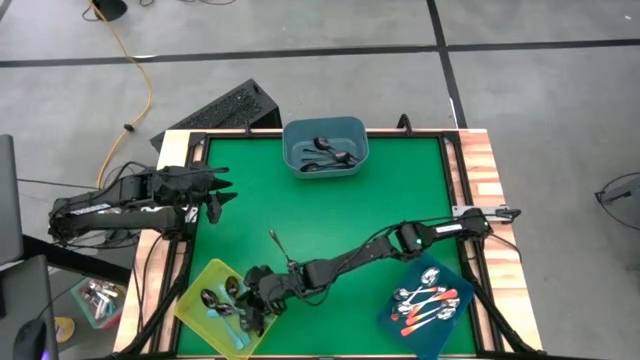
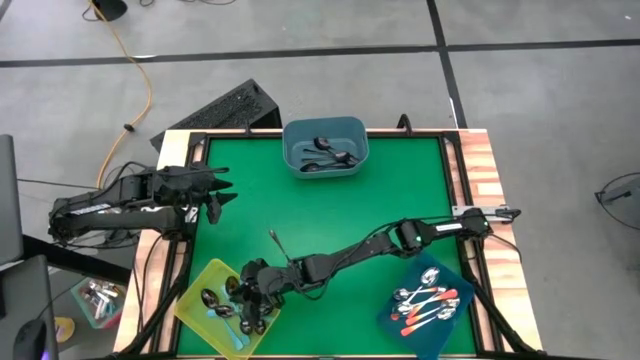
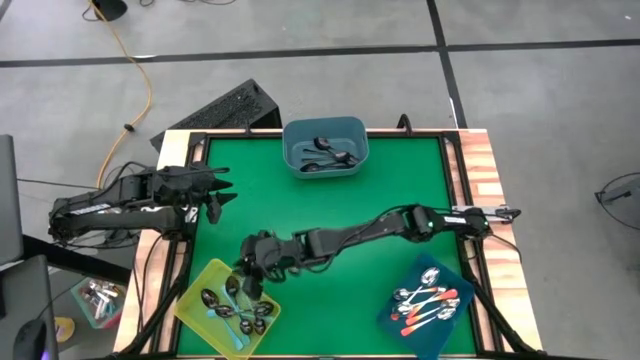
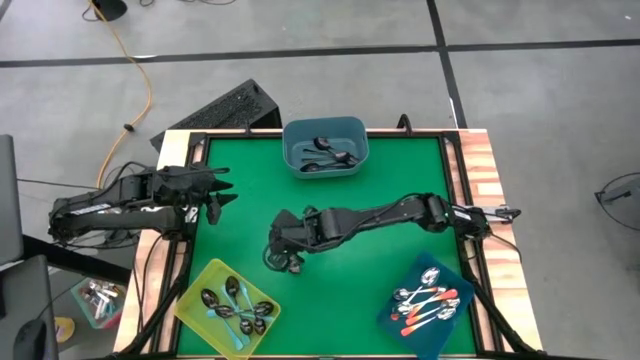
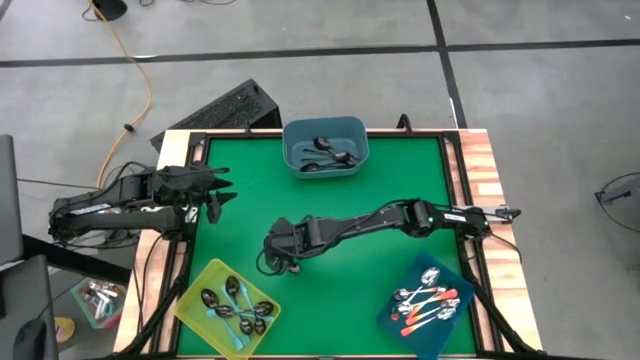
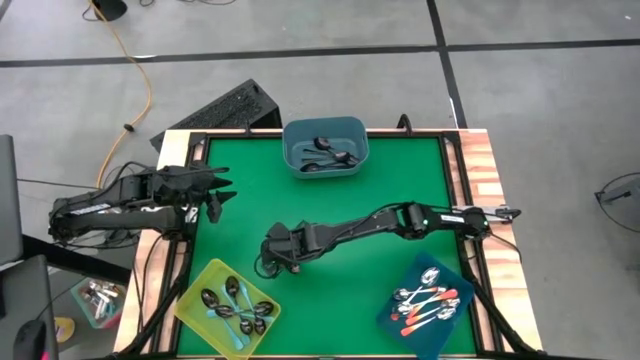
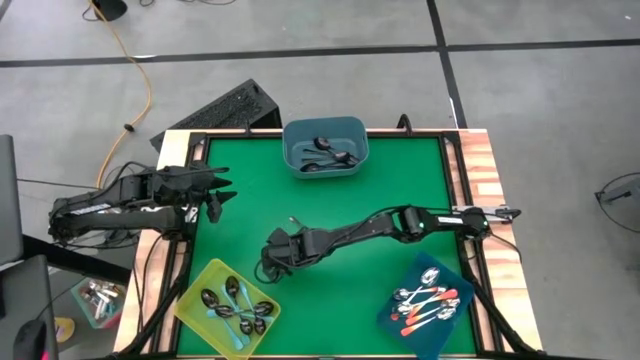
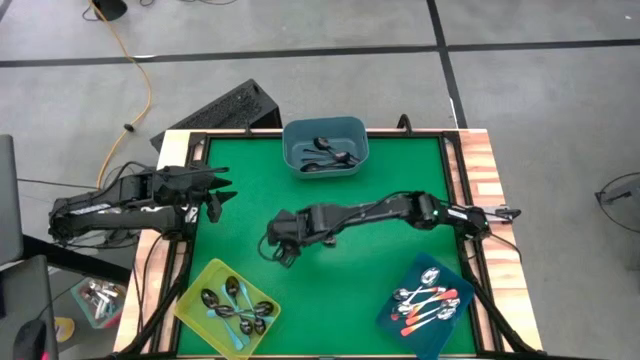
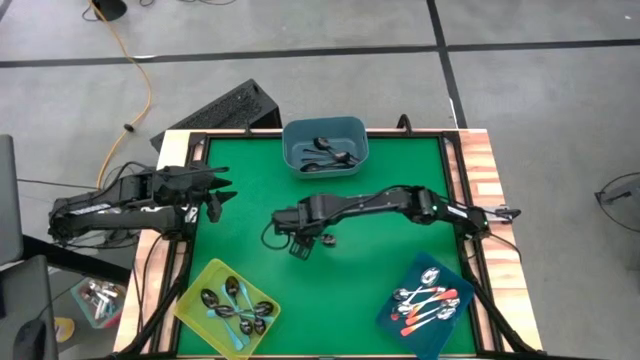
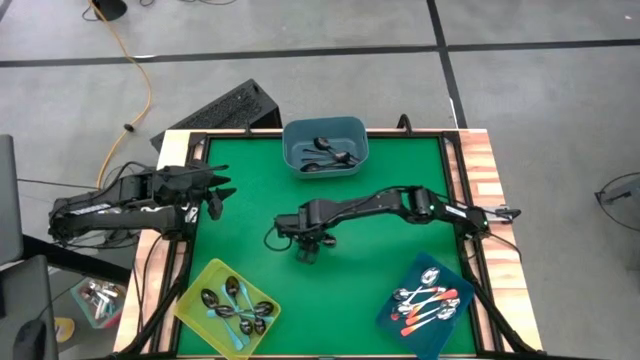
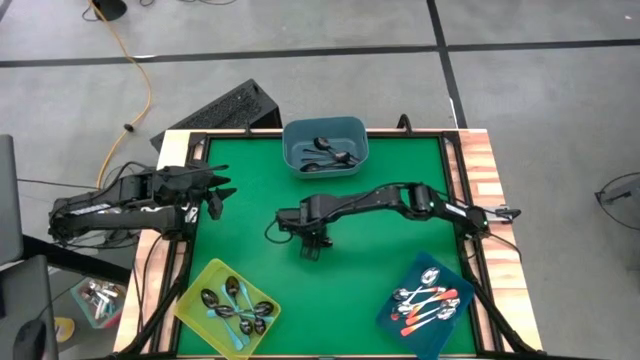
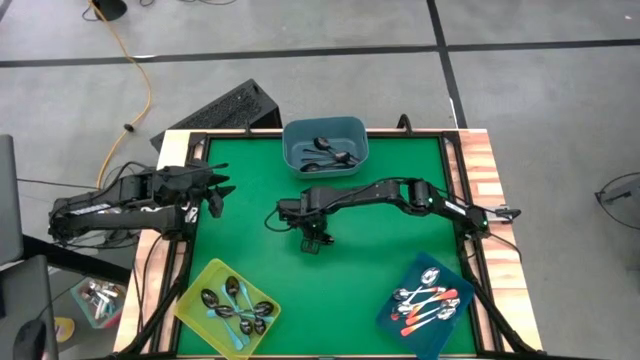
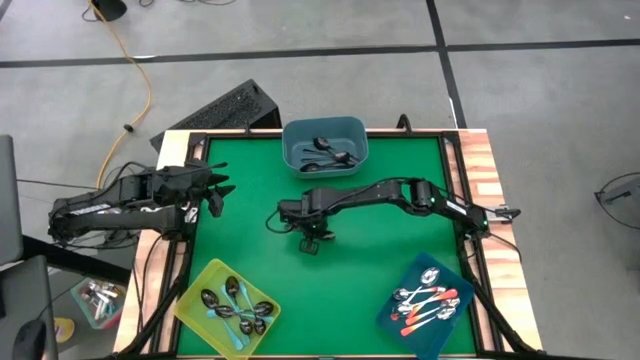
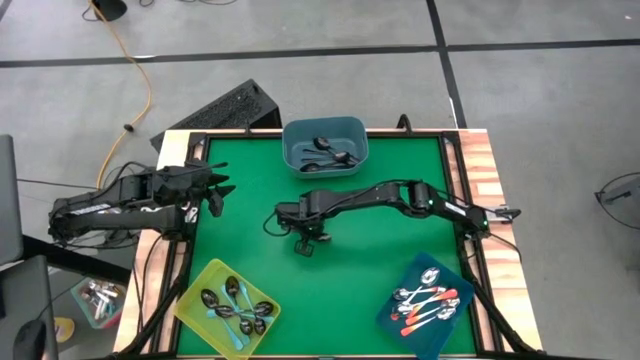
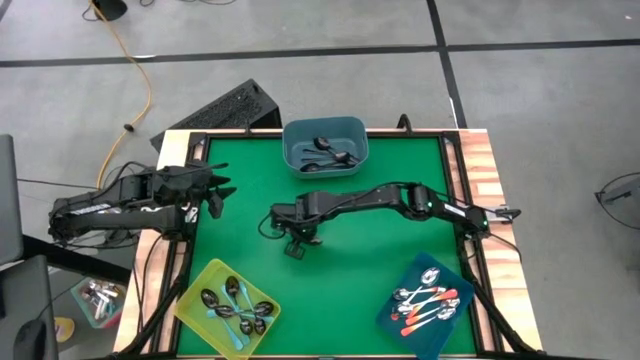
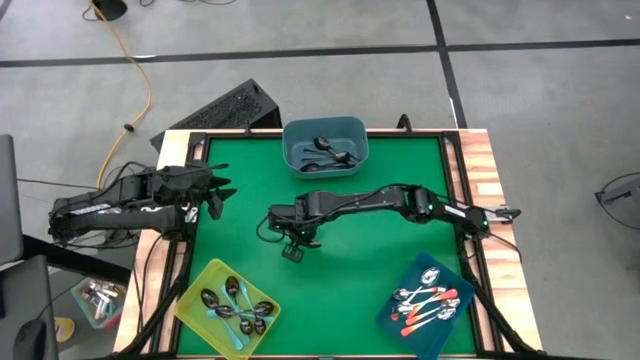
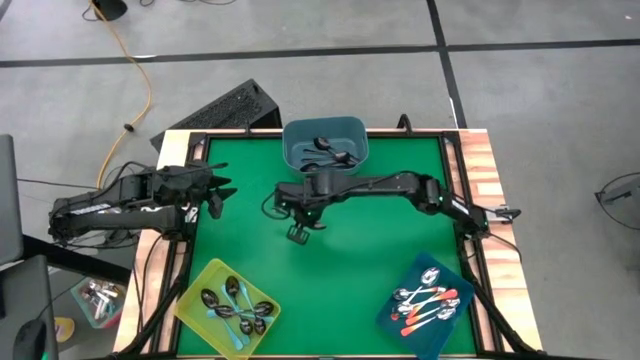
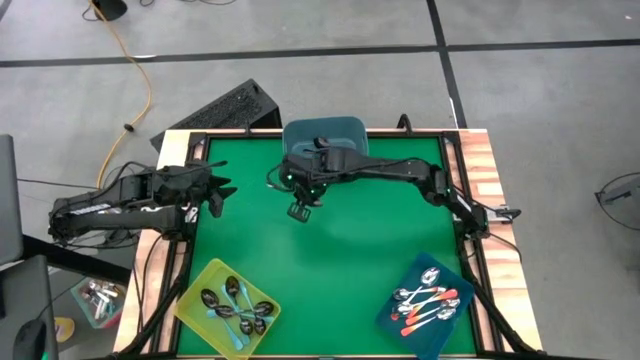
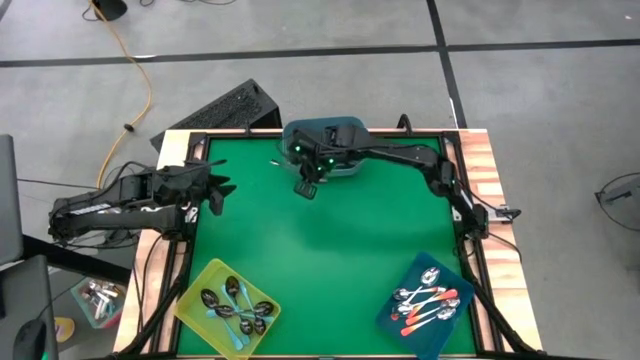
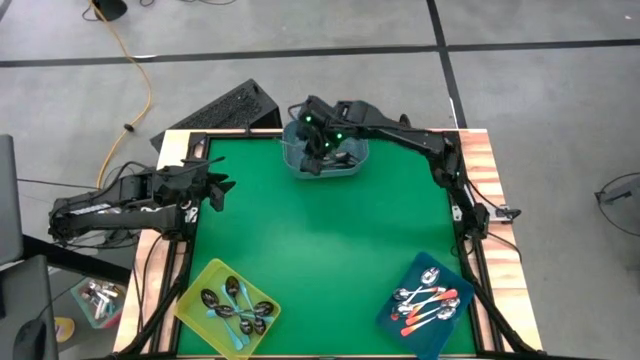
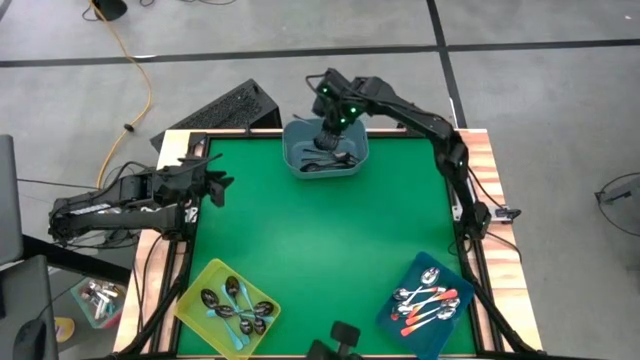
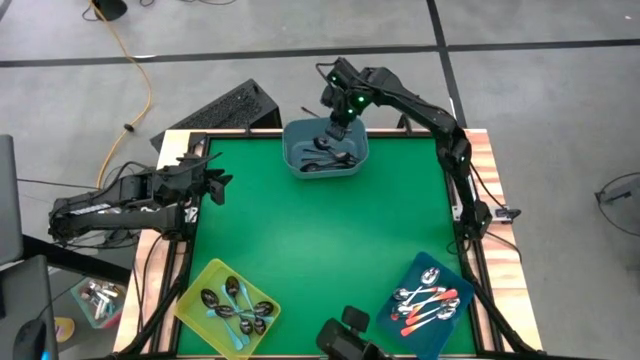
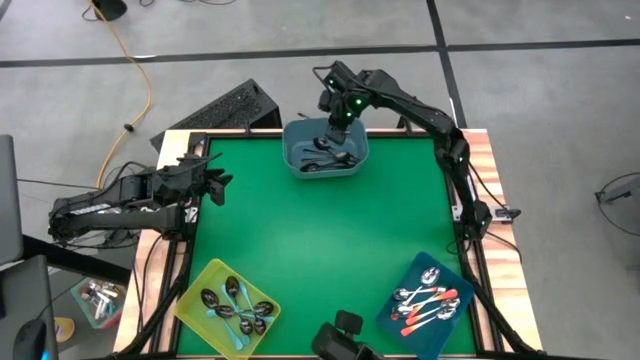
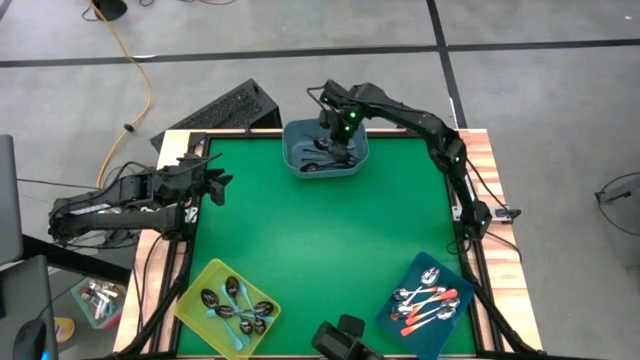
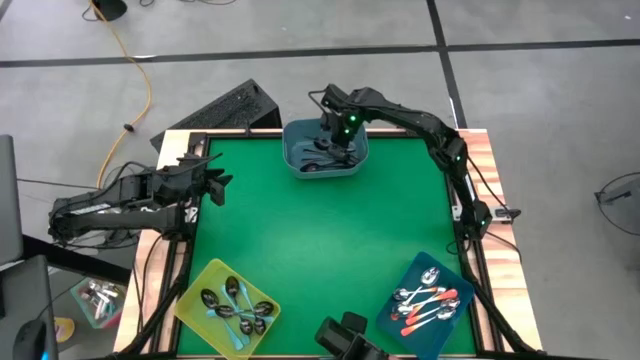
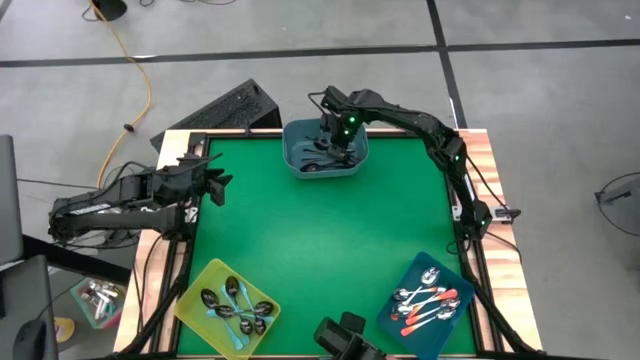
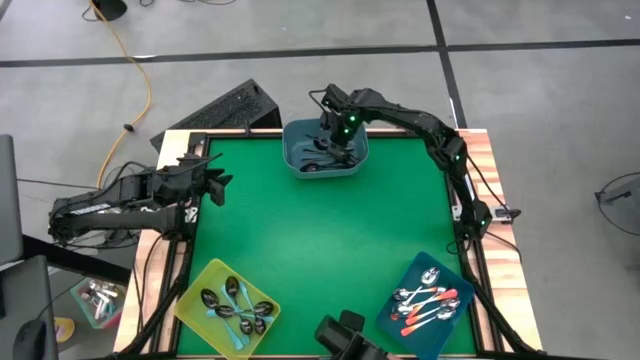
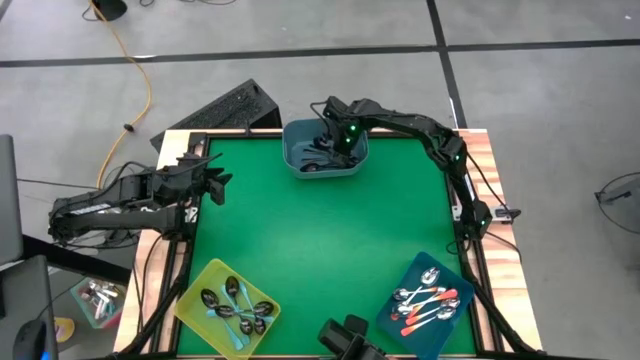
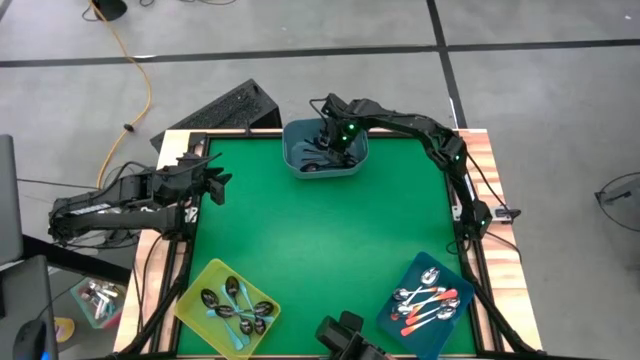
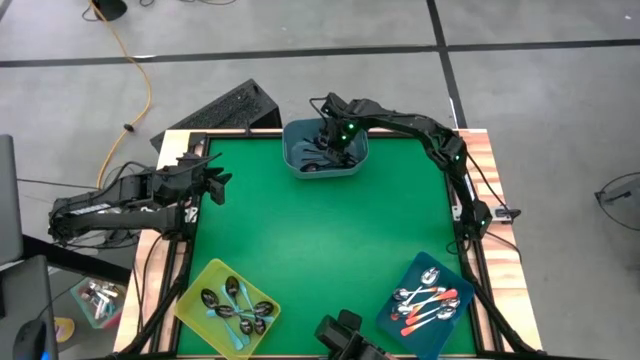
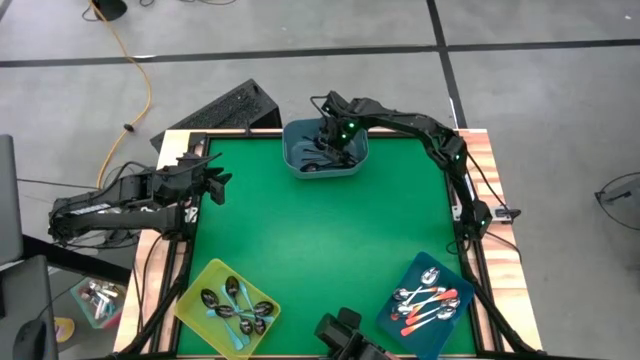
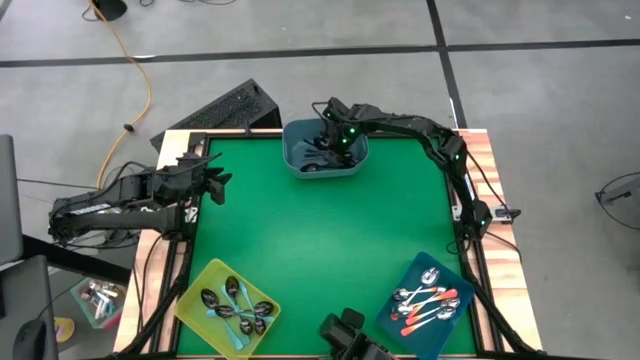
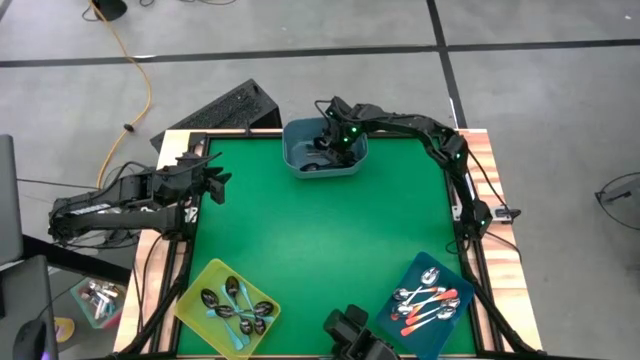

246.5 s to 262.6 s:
Task: Sort silverware by color (type)
Put the black spoon into the light blue bin

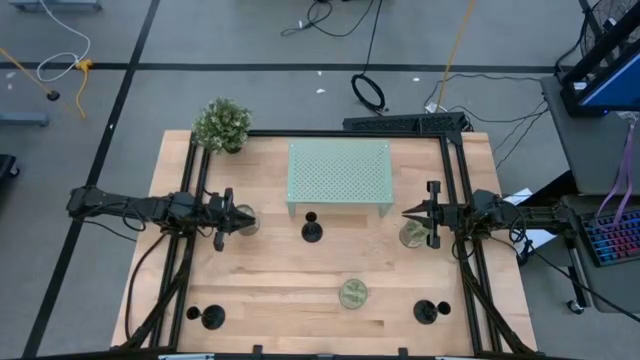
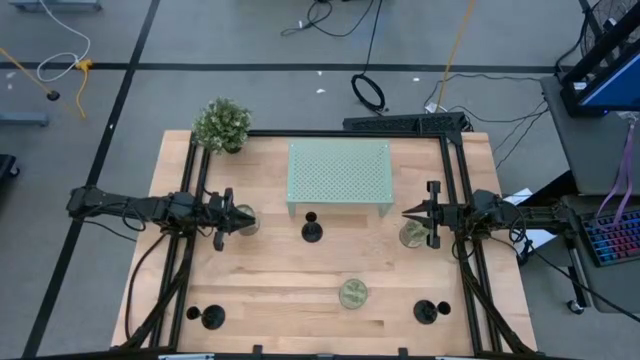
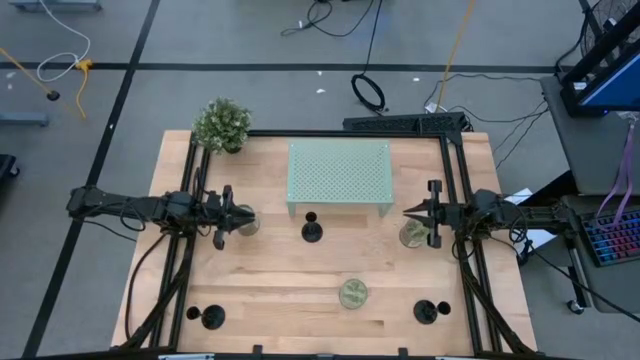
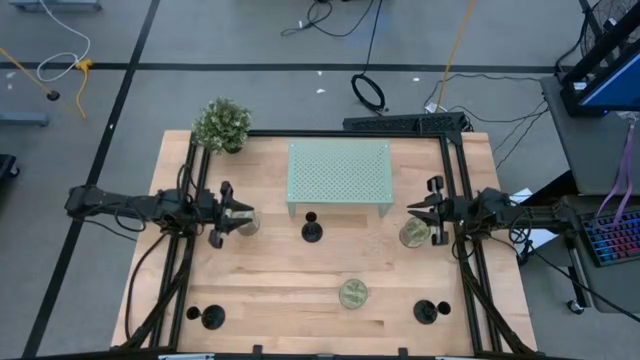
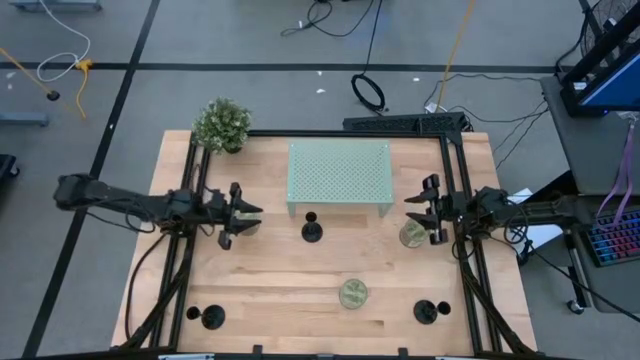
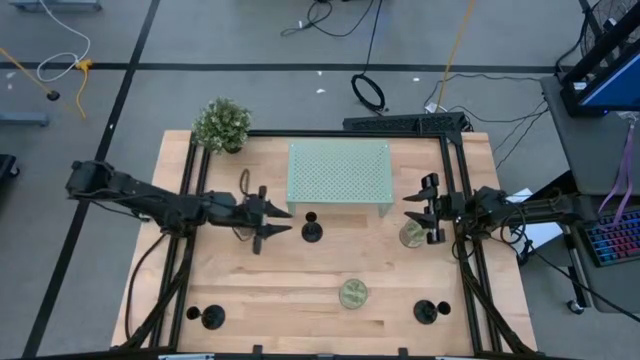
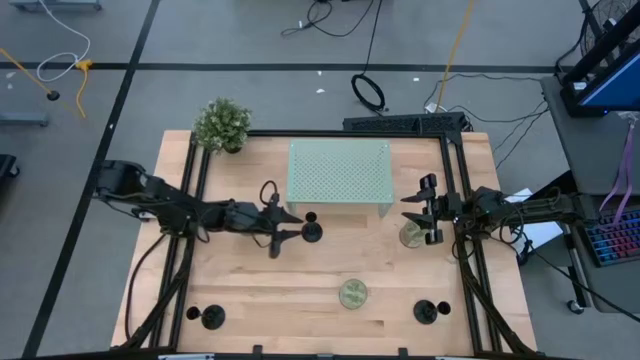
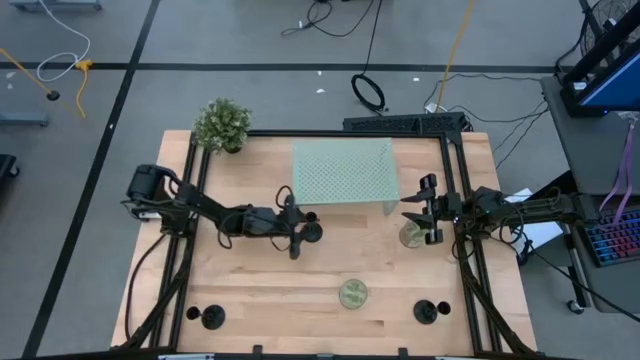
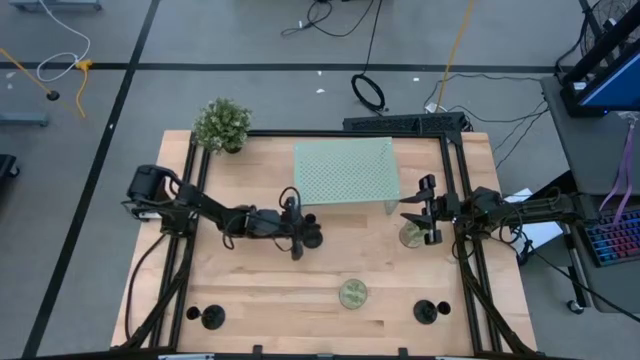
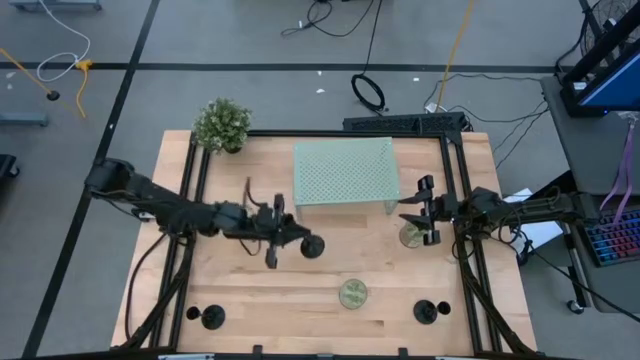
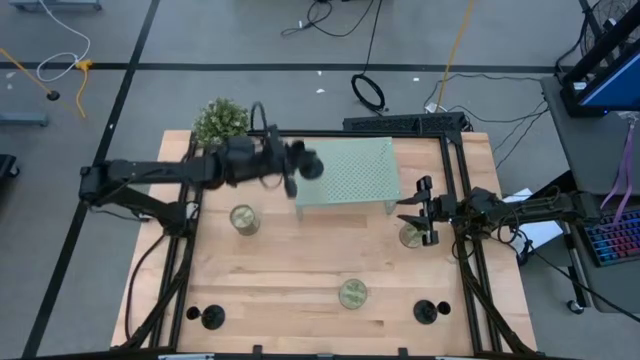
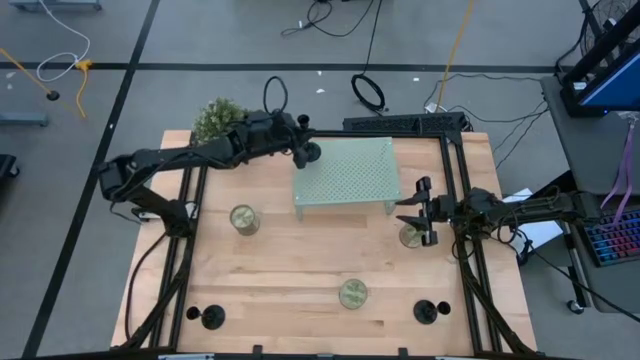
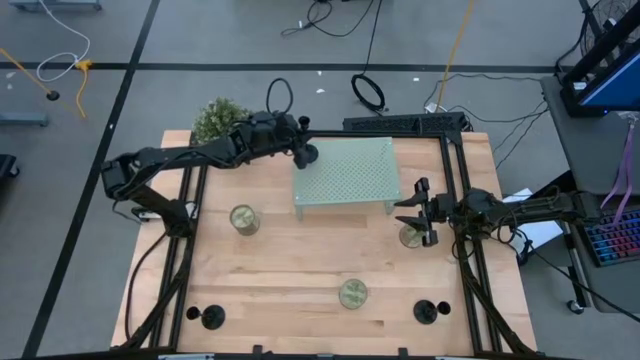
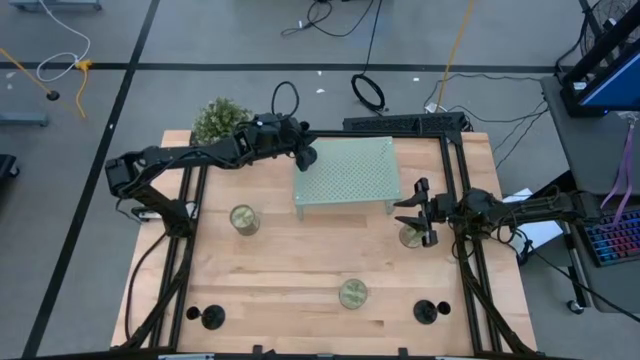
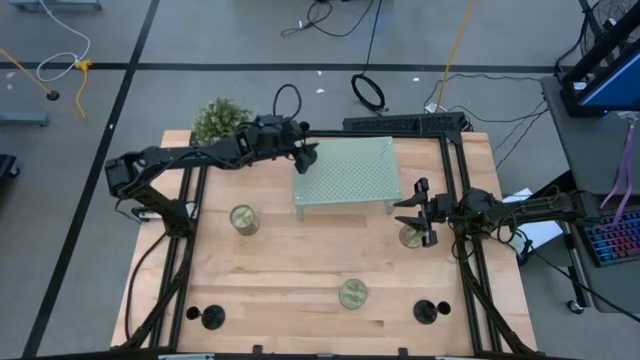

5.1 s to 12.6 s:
Task: Pick & Place candle stick holders
Put the top black candle holder on the shelf
